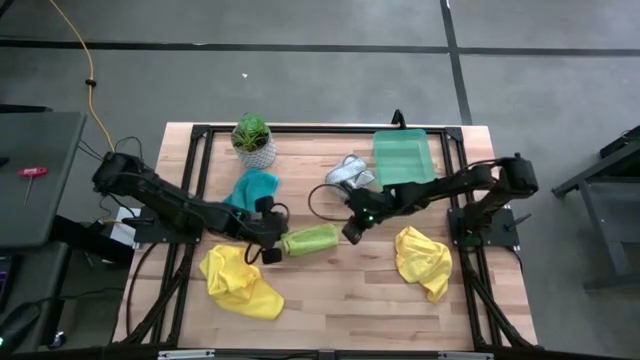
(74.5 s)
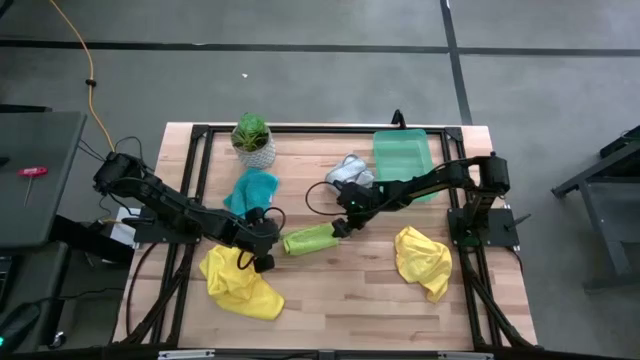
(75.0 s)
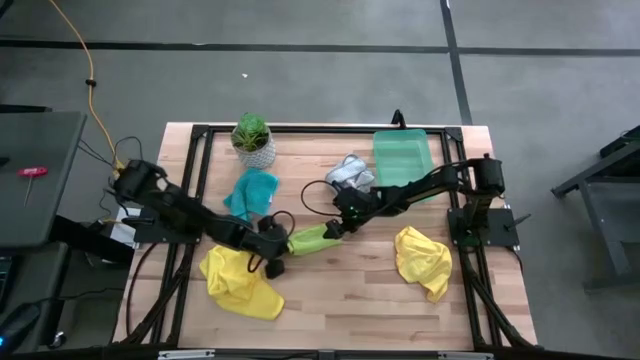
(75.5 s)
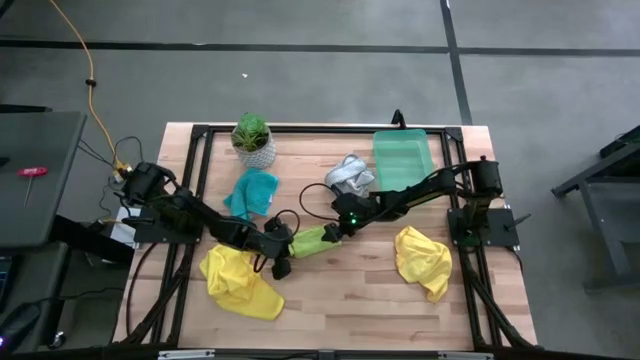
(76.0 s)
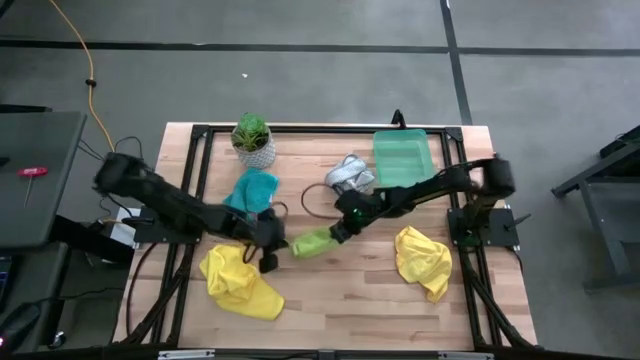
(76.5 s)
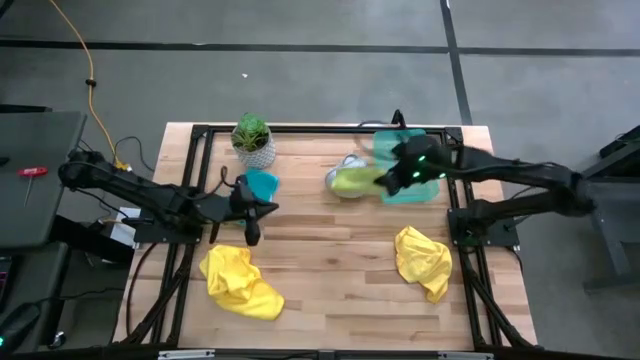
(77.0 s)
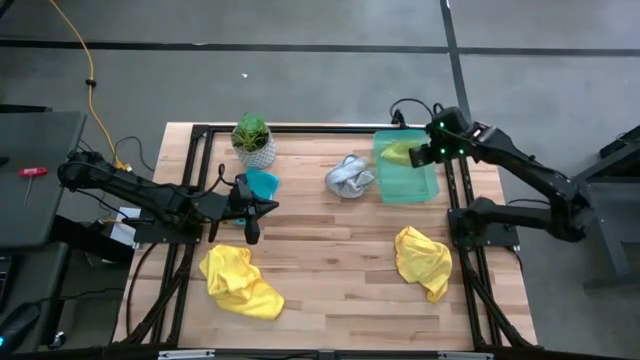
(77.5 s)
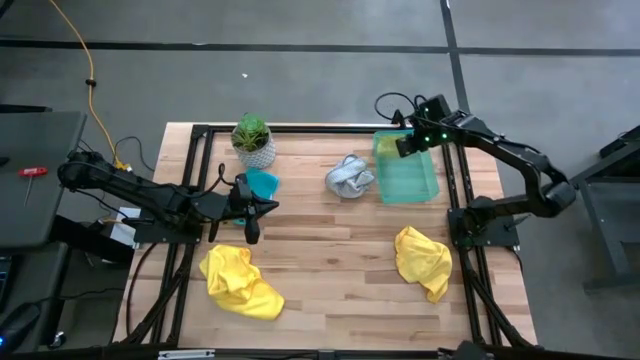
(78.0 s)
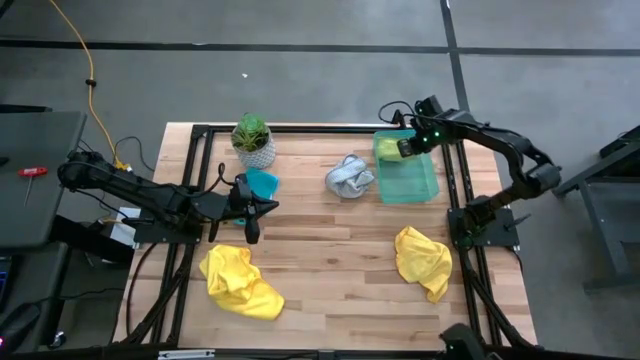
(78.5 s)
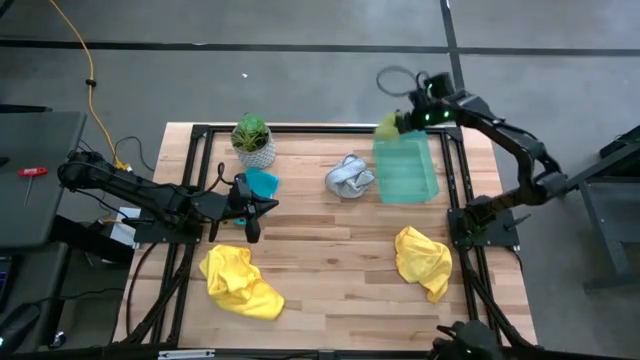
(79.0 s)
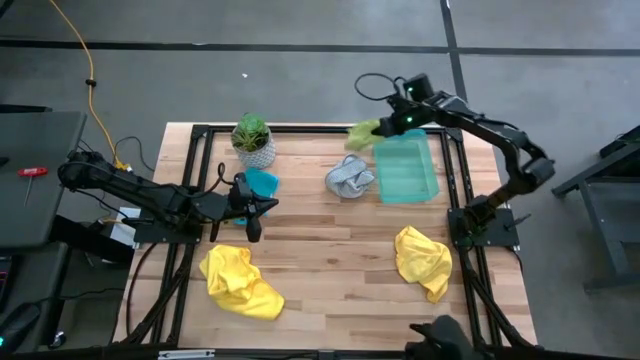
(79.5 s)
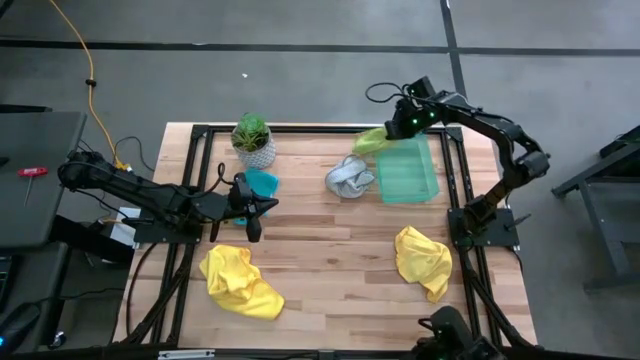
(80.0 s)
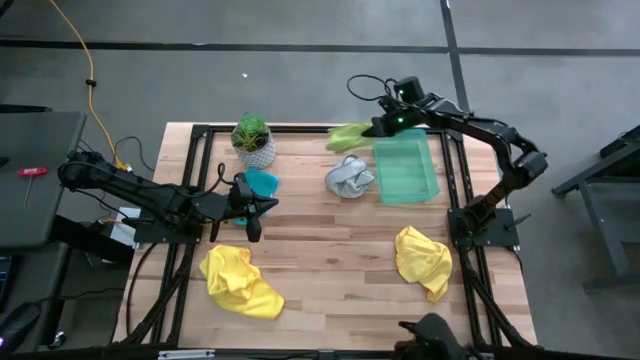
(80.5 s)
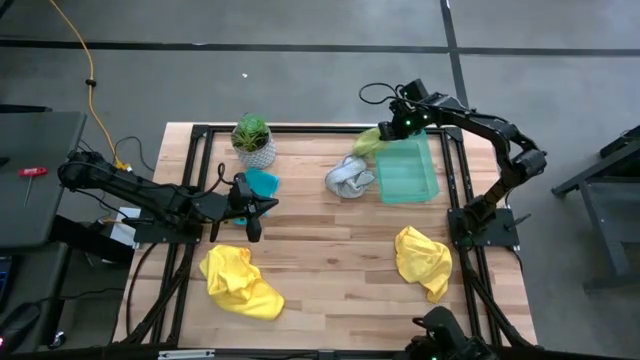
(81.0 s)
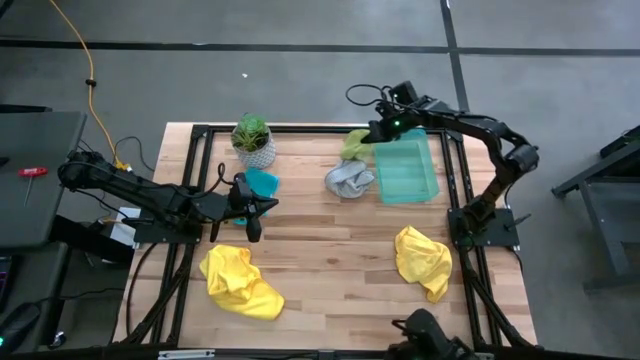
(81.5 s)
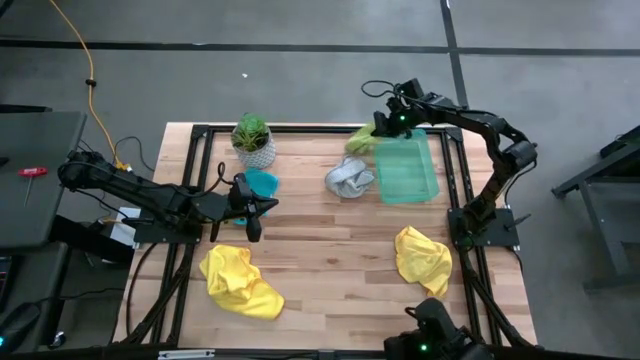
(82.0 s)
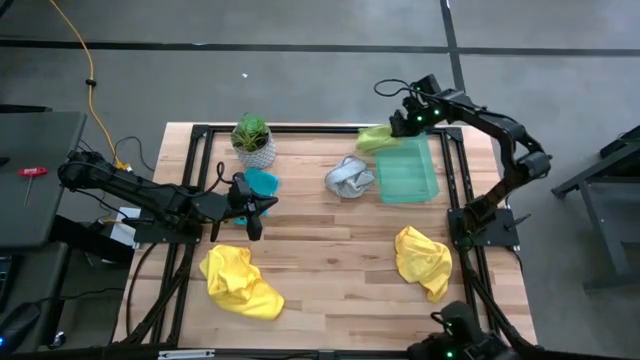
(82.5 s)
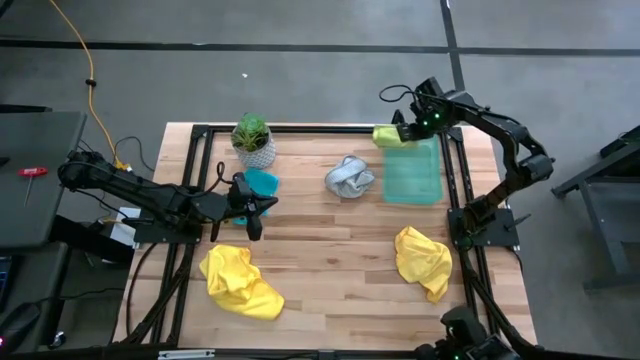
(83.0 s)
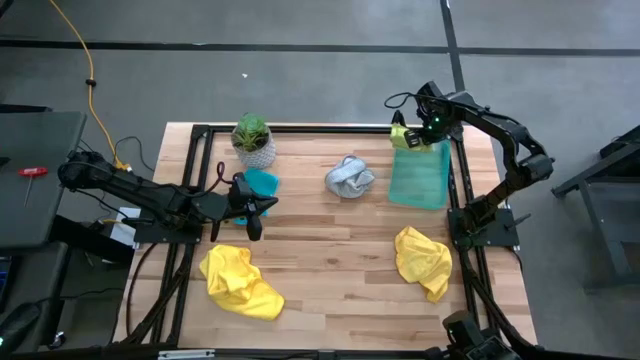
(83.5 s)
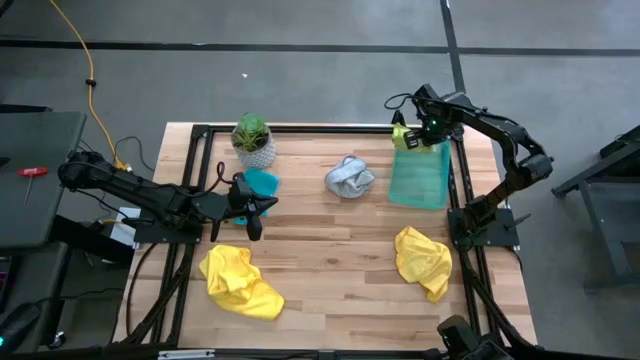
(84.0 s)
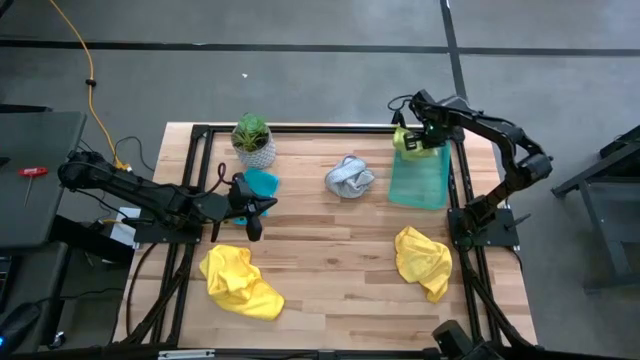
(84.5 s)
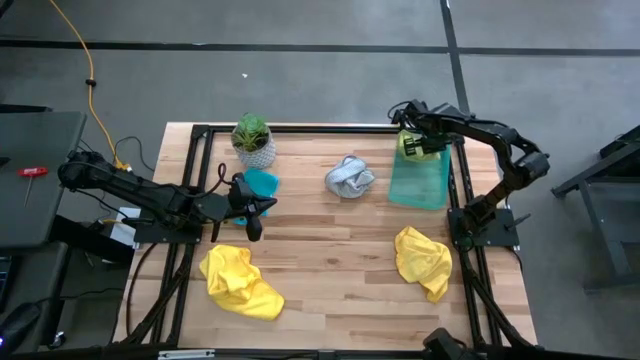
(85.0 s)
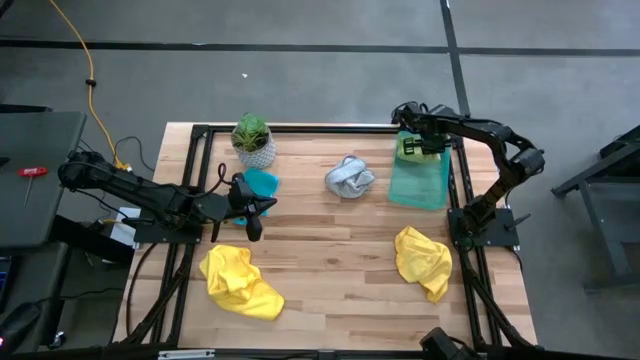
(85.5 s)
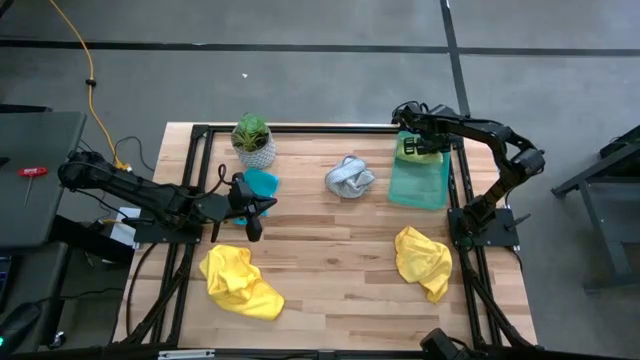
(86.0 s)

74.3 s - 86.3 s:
Task: Fold microfiber towels
Put the folded green microfiber cloth into the green bin
